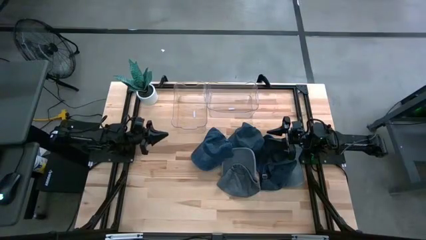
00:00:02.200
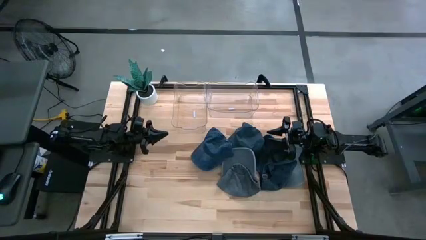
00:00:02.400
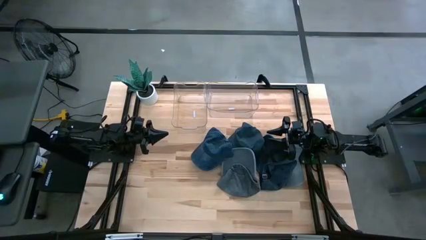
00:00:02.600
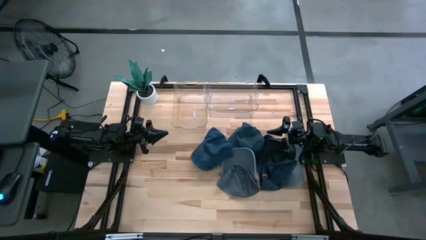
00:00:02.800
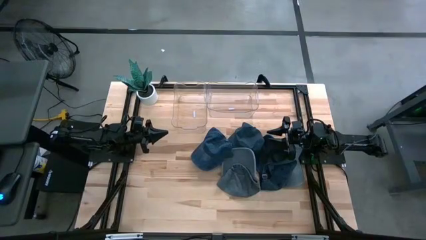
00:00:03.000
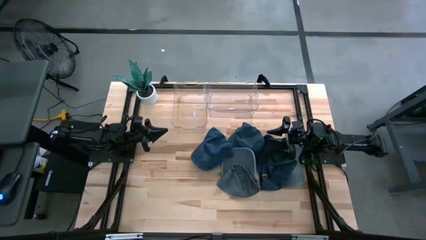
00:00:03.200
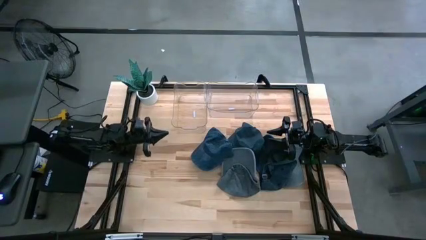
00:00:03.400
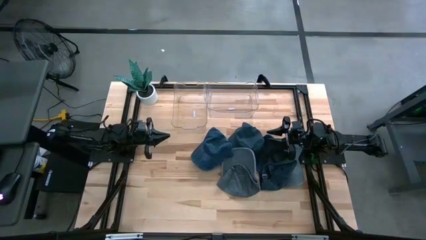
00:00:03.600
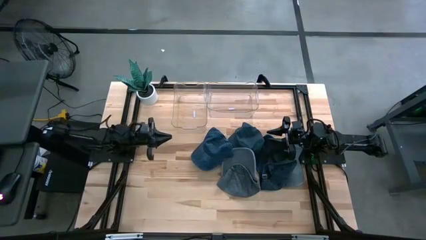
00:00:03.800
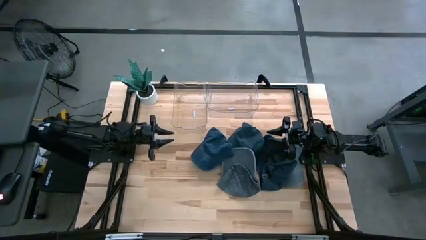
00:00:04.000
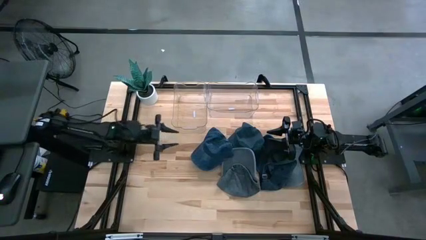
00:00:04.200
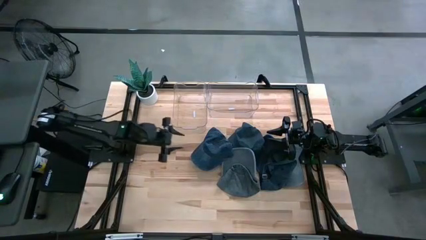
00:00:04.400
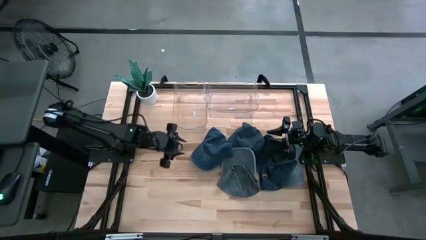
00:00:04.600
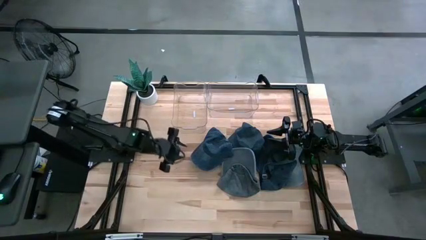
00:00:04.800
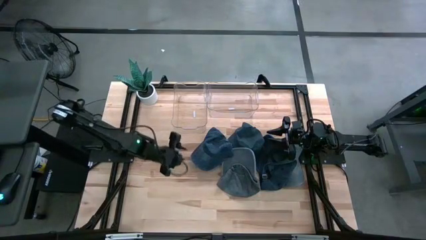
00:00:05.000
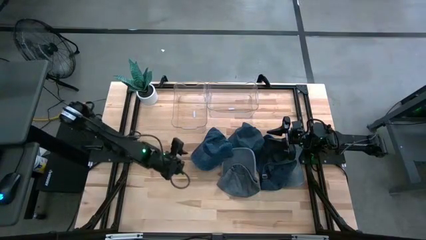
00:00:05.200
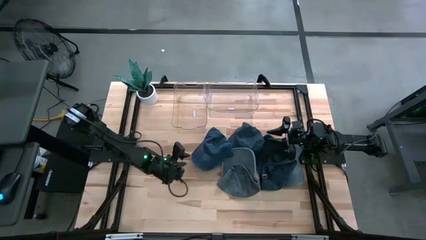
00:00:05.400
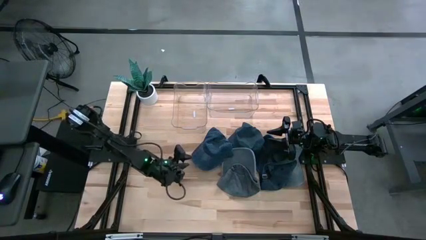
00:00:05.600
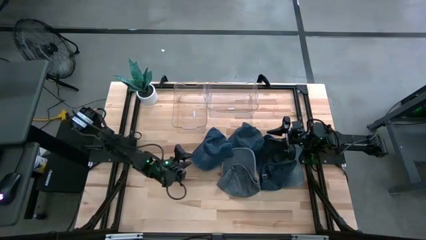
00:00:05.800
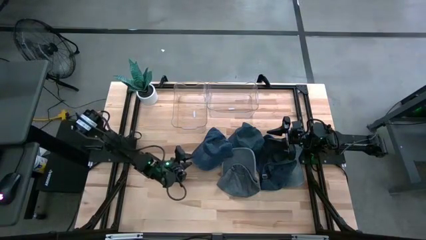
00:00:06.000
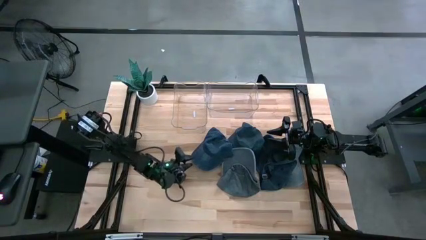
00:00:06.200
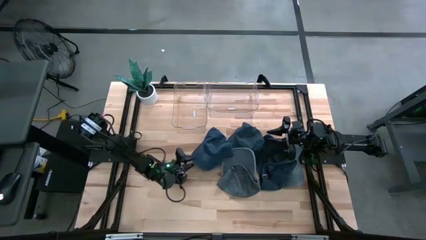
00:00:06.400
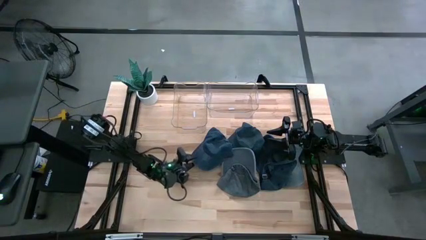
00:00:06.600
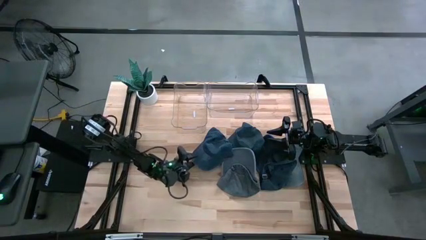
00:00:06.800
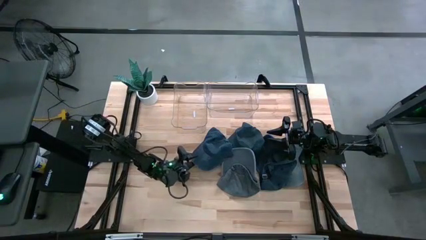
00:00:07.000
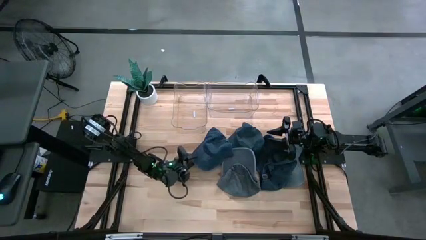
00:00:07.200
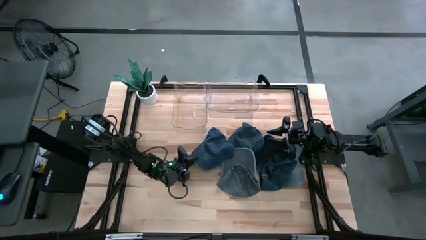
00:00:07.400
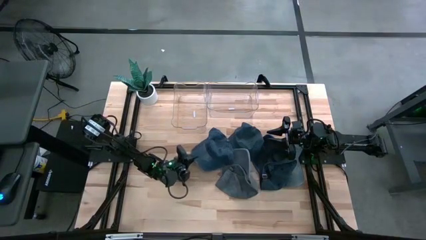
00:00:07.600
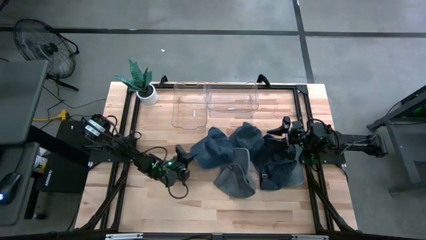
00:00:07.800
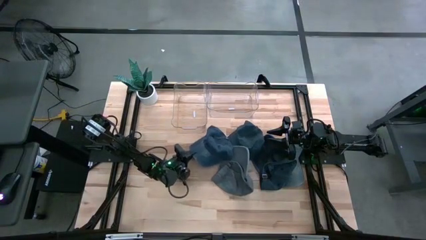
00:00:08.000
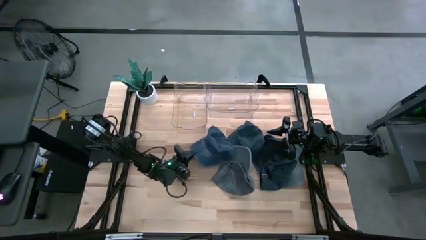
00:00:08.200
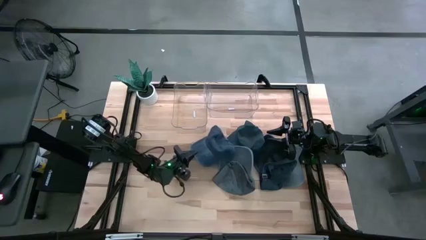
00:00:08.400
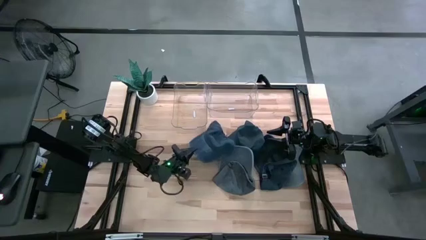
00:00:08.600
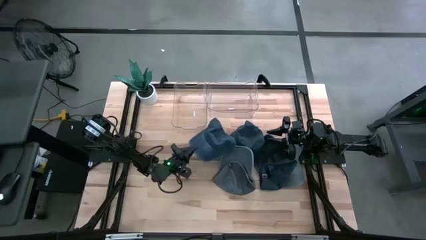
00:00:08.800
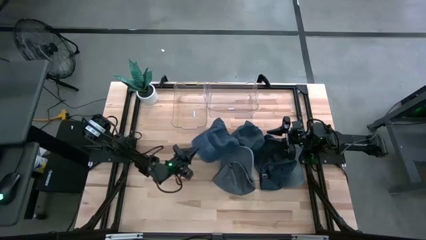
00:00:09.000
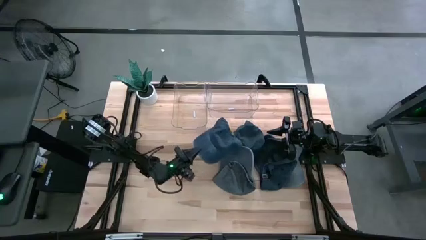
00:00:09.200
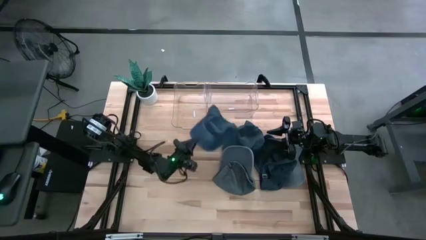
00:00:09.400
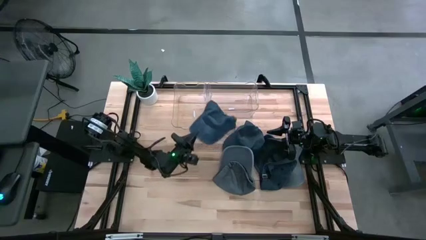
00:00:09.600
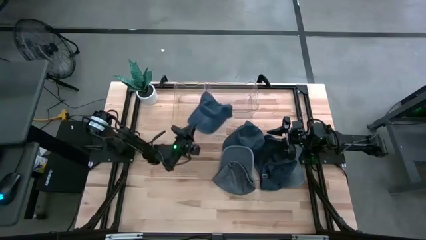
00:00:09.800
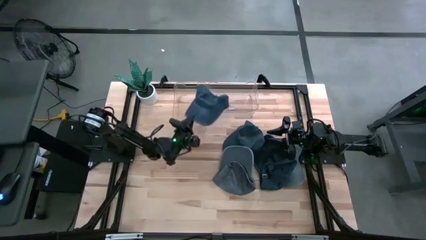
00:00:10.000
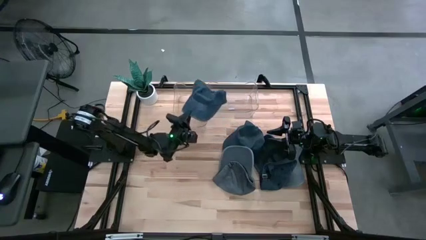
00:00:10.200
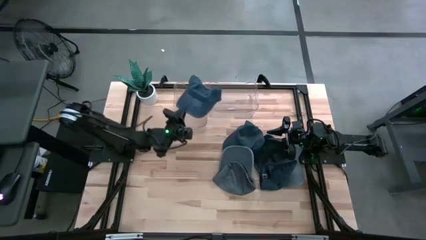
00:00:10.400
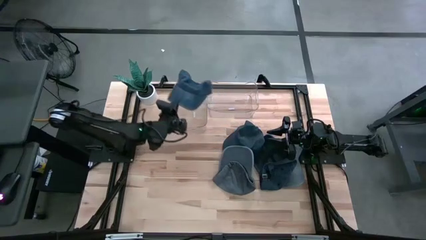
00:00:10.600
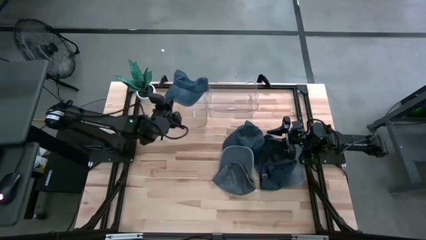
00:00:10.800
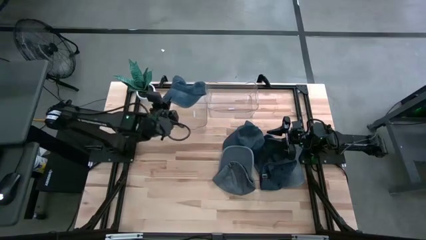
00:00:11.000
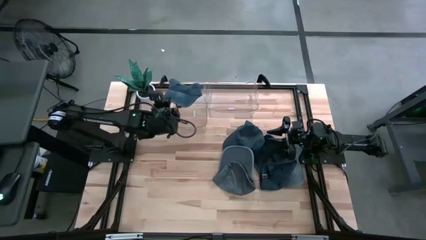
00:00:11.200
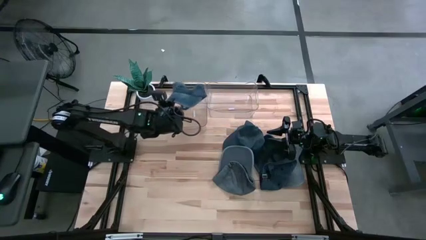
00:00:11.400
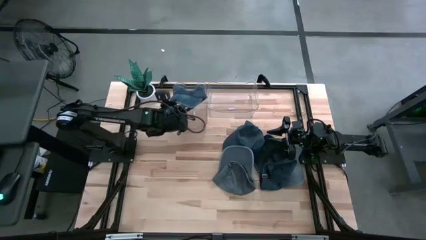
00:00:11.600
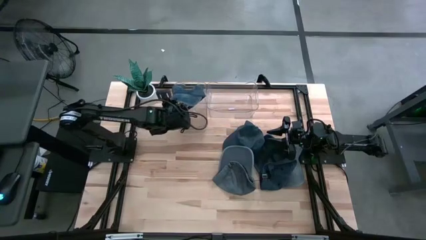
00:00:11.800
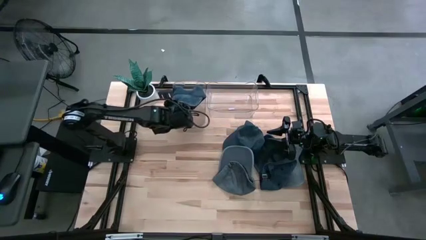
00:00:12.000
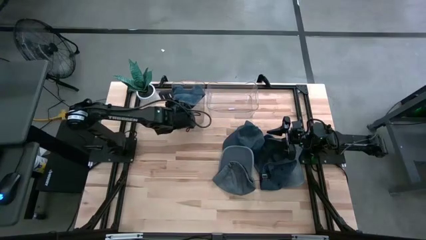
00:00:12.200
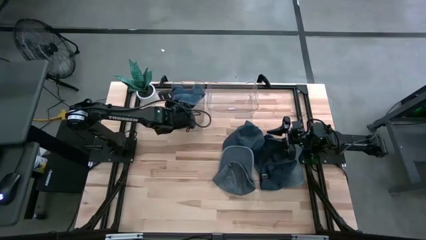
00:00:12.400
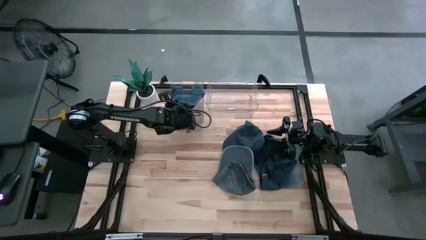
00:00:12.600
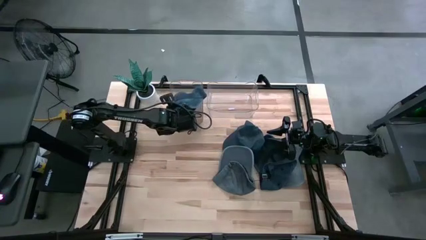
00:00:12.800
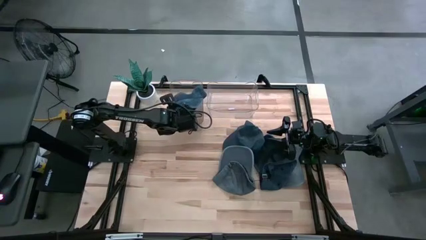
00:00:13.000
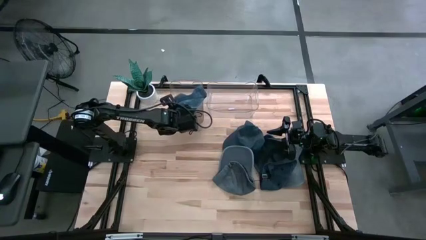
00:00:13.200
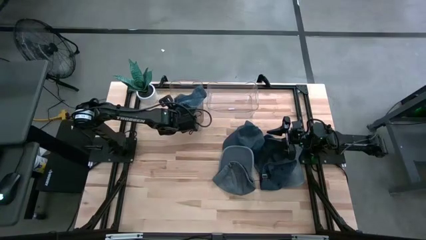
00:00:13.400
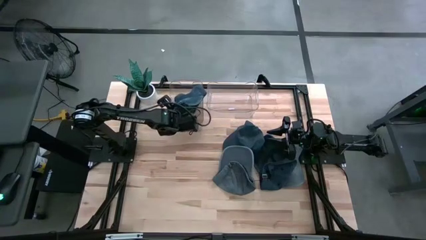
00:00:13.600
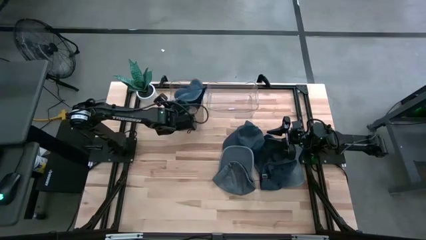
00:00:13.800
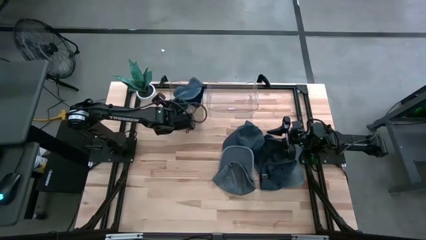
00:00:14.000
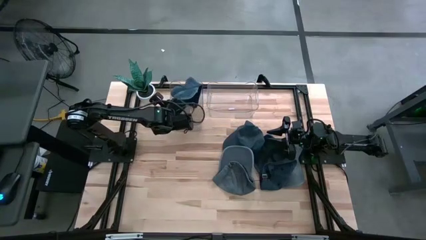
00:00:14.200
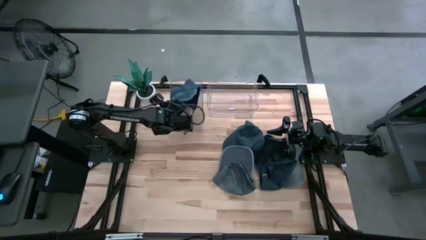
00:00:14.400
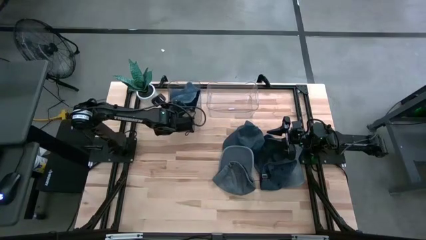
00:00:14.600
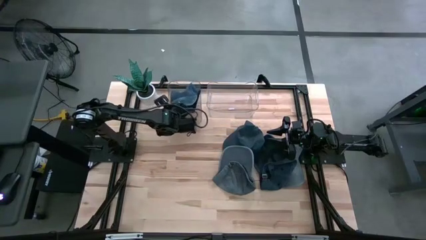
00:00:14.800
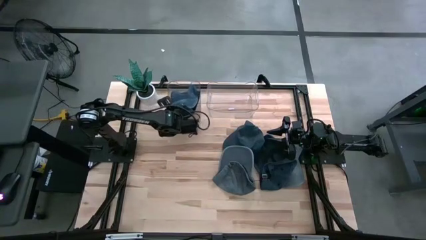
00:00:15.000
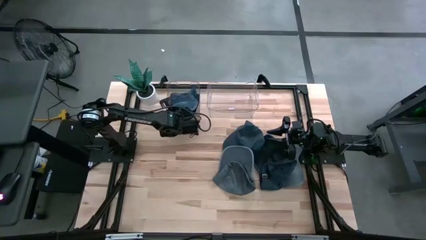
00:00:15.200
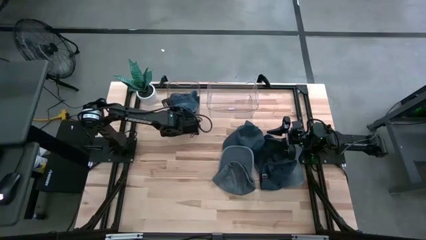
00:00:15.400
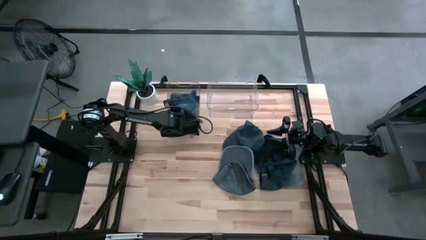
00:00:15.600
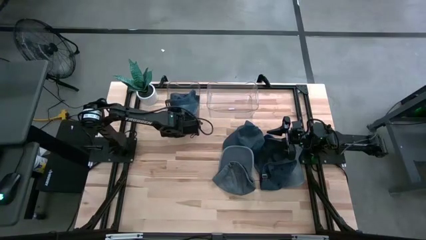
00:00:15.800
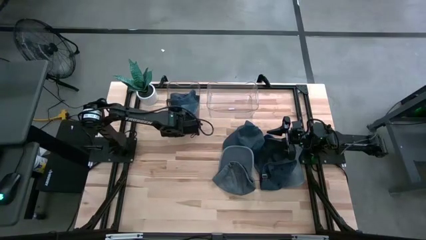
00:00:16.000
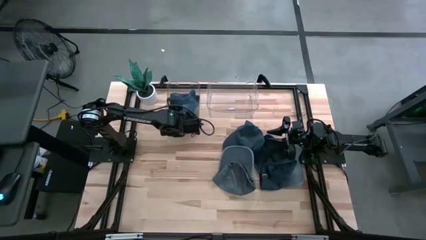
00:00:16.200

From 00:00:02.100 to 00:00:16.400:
Task: Pick & Place hat
Put the left blue cap into the left transparent bin
